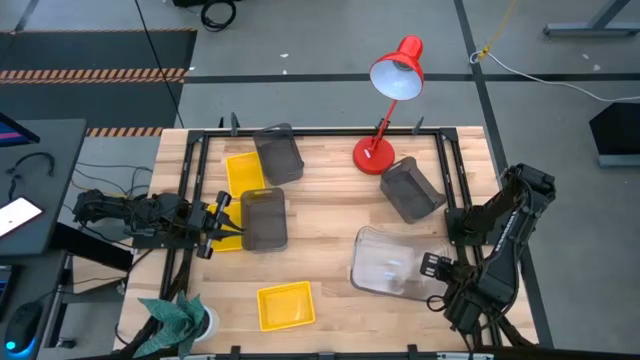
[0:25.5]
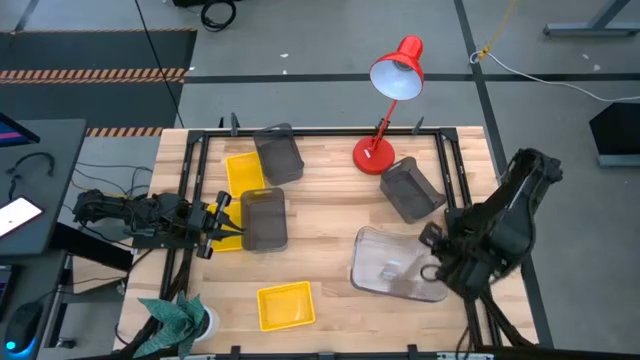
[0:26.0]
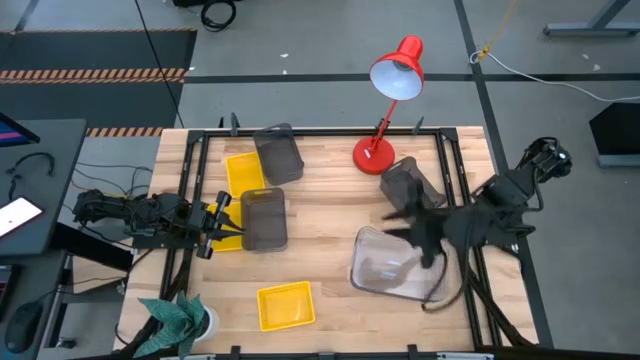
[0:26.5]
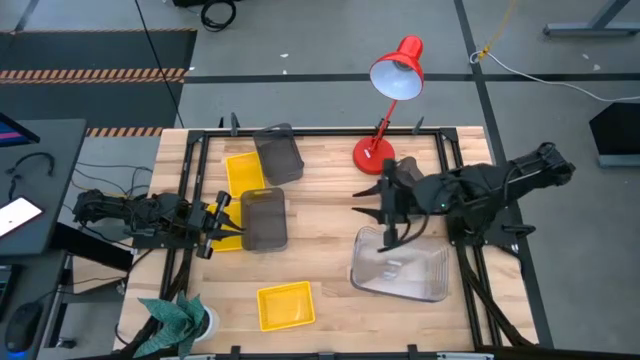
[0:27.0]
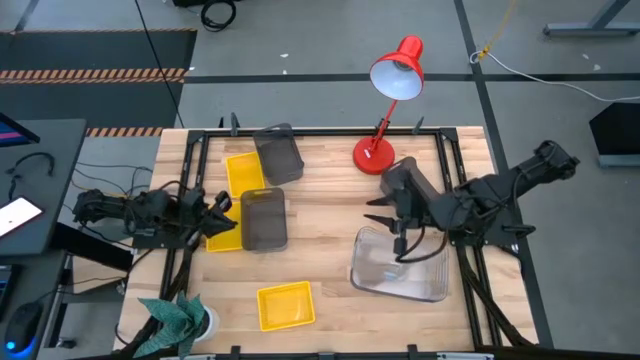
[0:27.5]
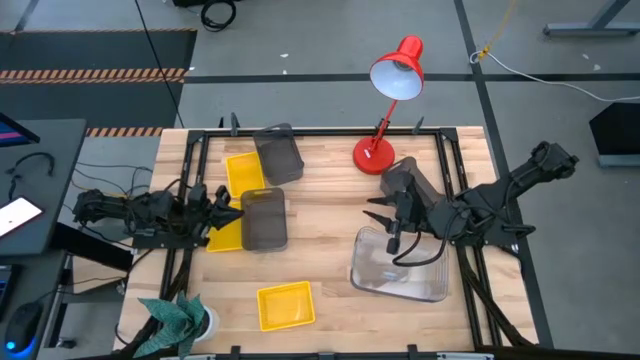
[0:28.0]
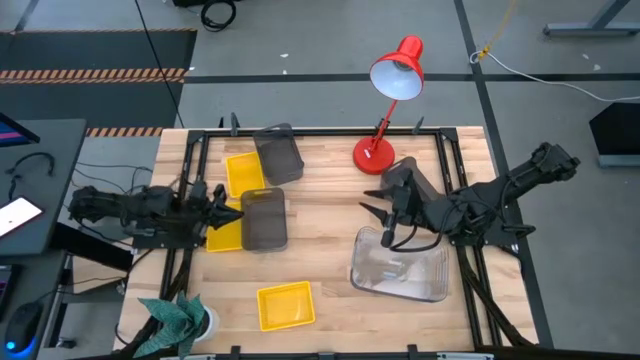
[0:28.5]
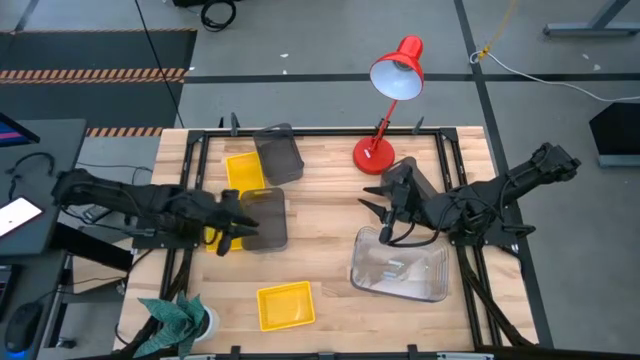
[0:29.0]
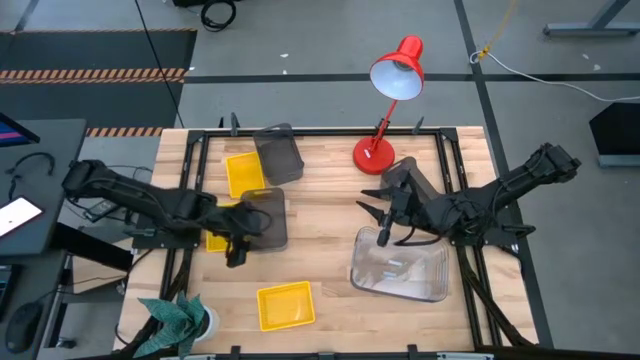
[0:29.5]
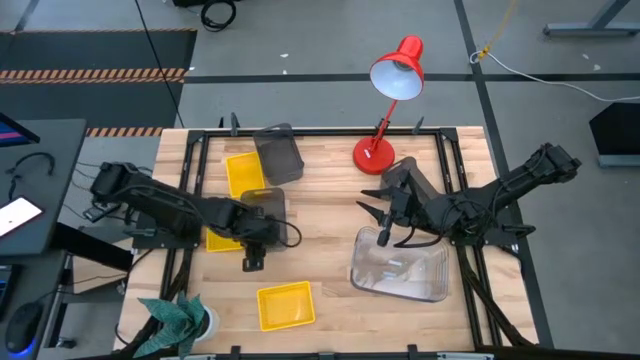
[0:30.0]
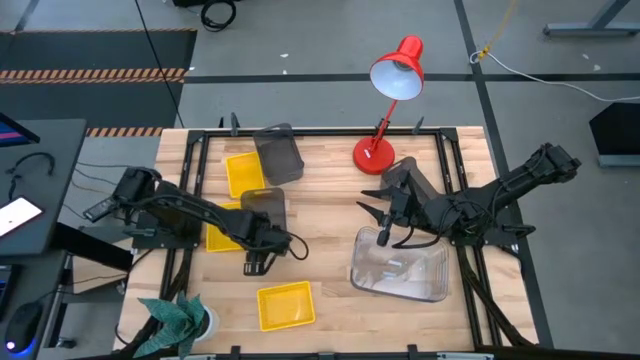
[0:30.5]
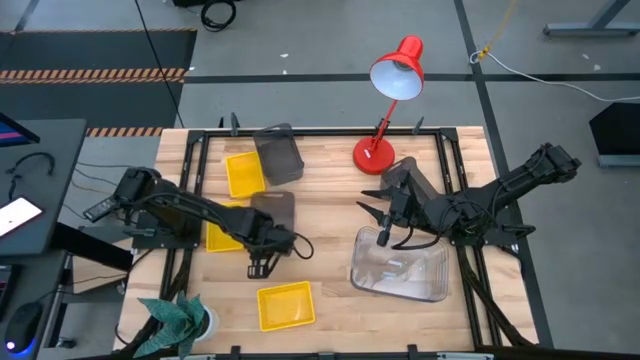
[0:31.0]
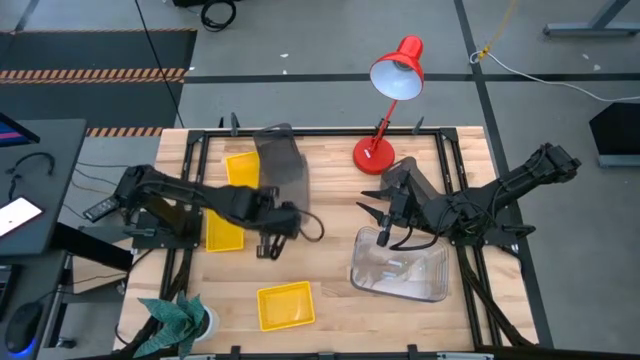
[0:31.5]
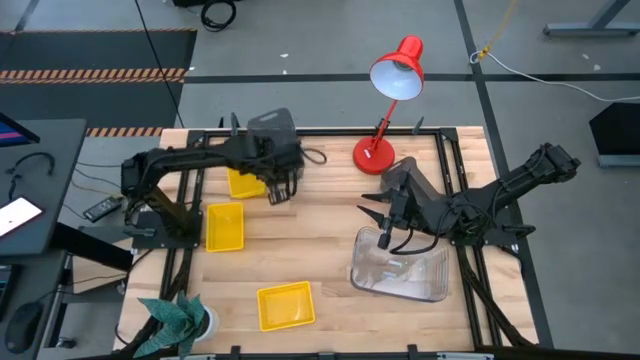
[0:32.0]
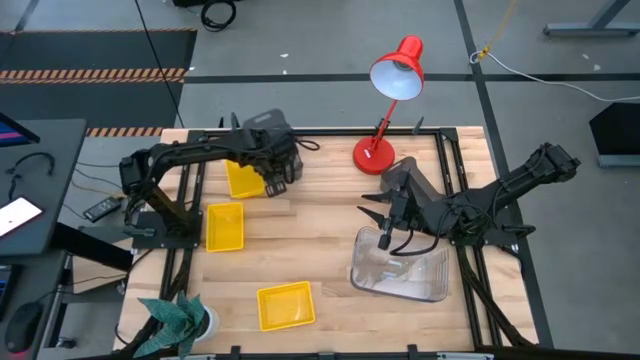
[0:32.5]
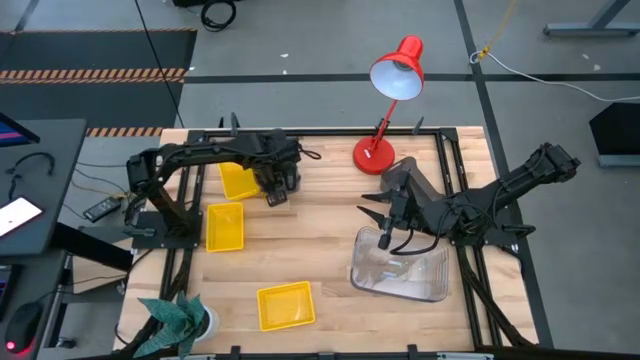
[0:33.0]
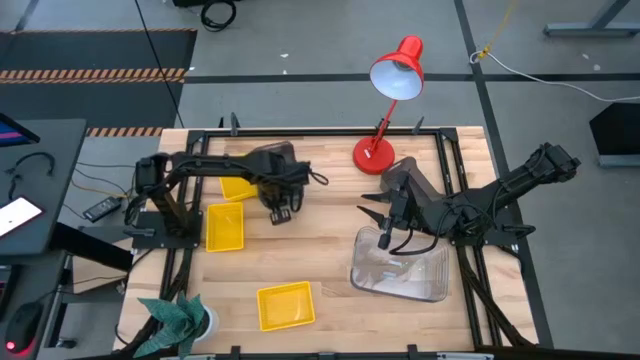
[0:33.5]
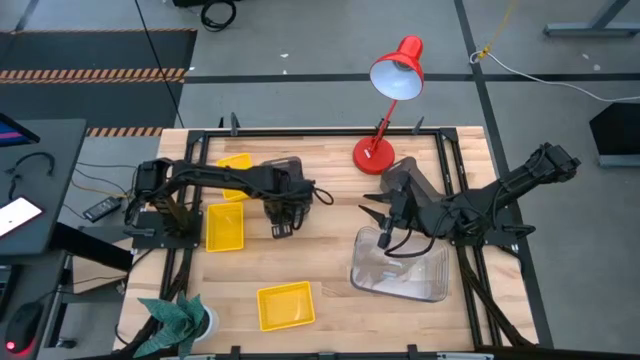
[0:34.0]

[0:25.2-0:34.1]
Stack the bottom left black bin on the top black bin

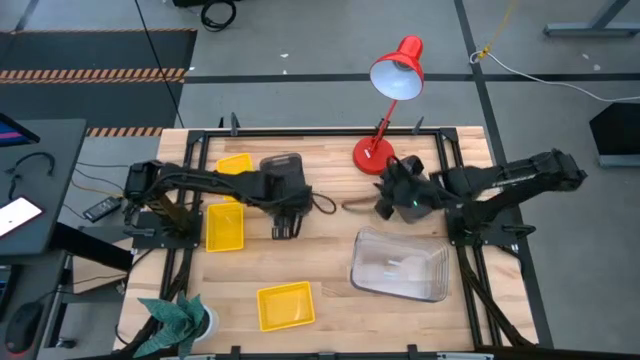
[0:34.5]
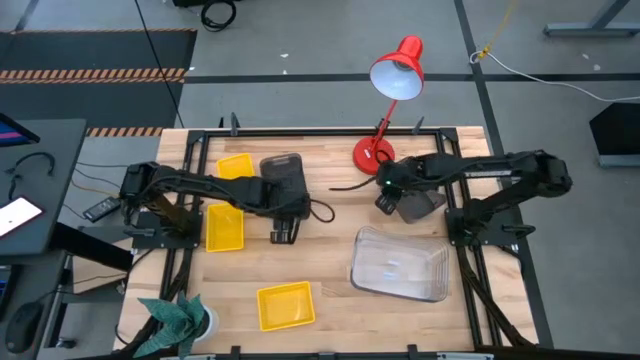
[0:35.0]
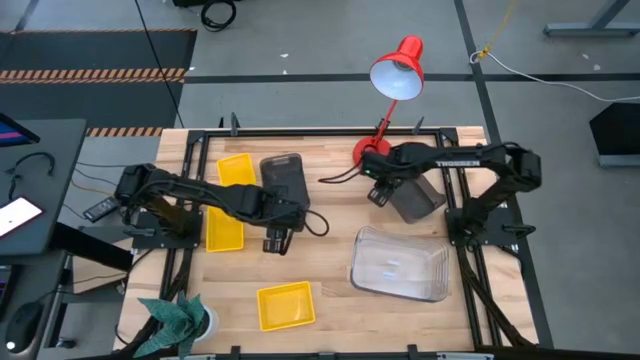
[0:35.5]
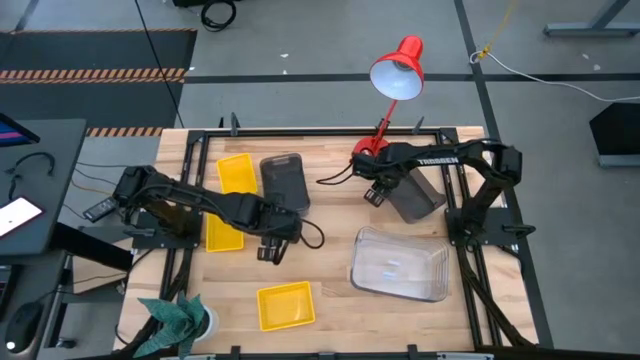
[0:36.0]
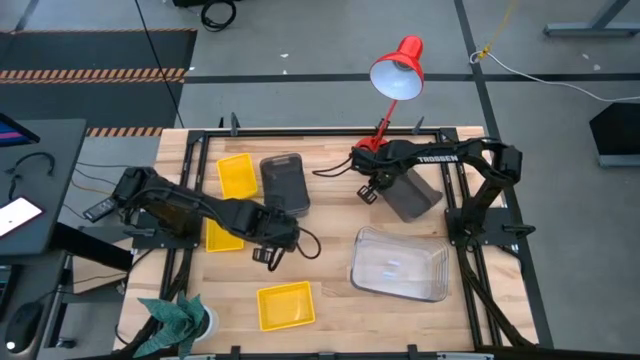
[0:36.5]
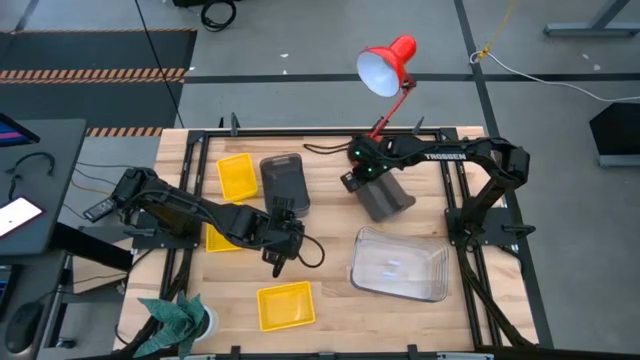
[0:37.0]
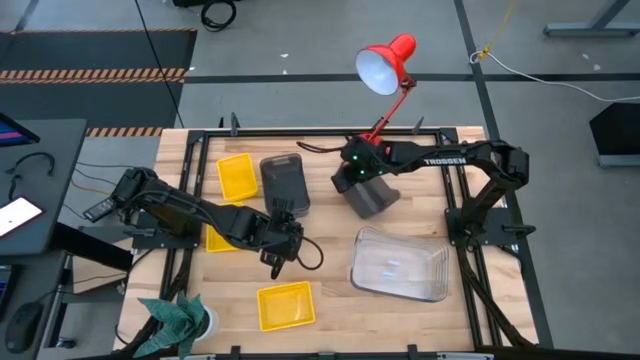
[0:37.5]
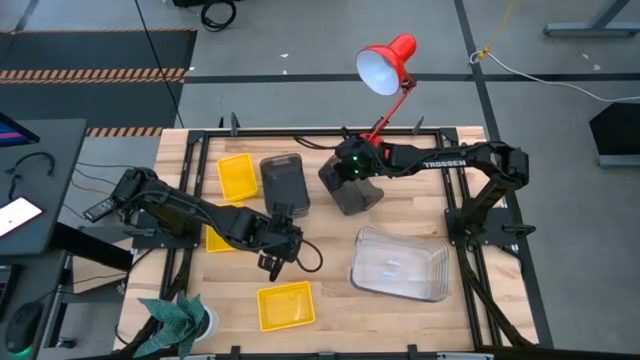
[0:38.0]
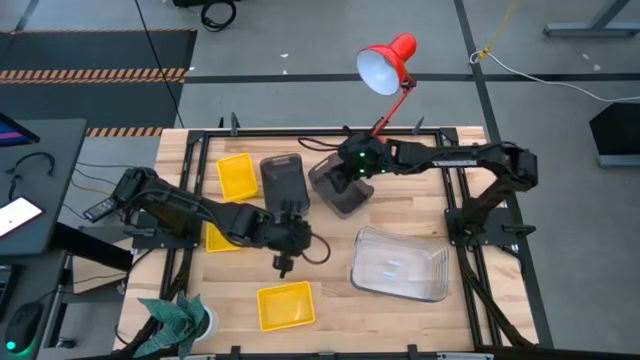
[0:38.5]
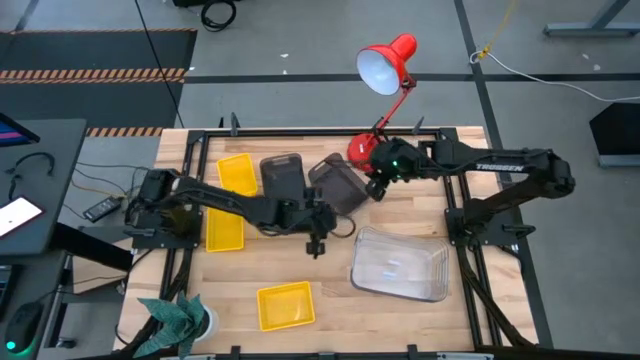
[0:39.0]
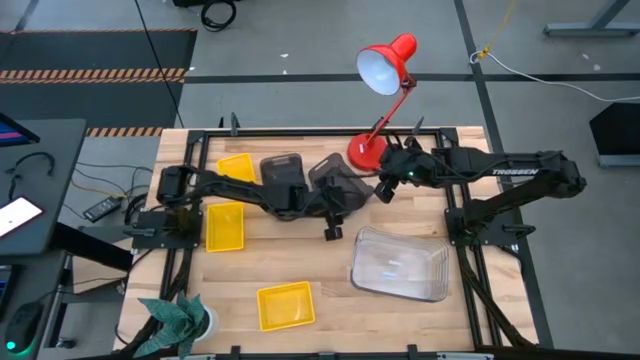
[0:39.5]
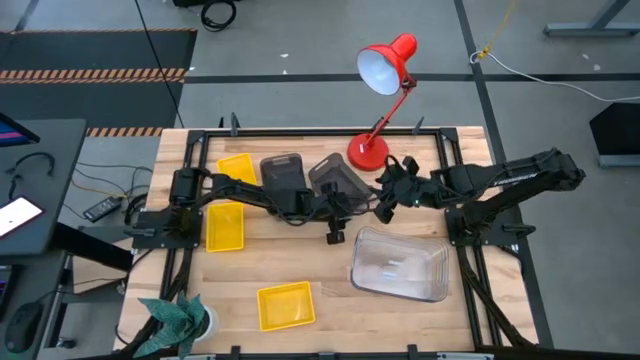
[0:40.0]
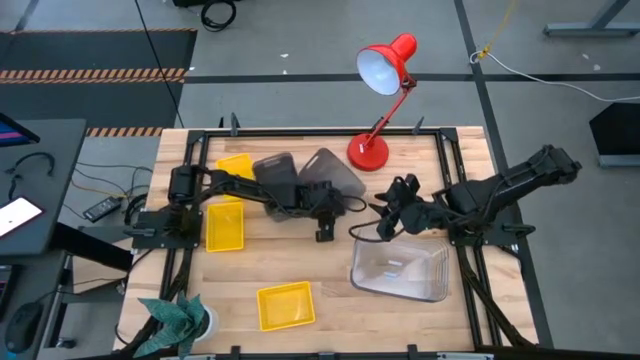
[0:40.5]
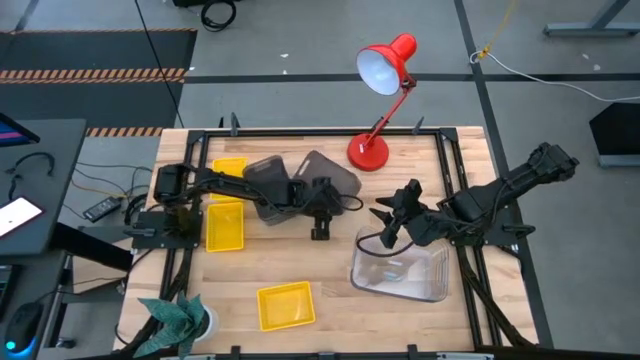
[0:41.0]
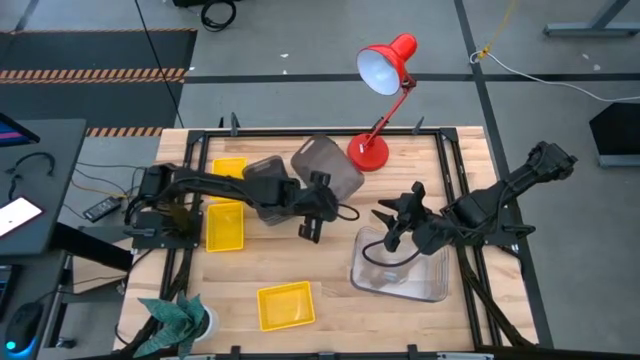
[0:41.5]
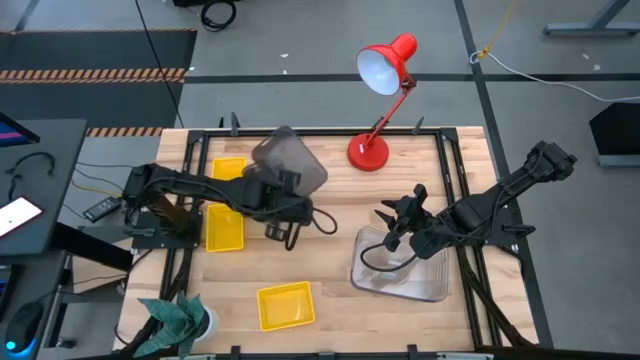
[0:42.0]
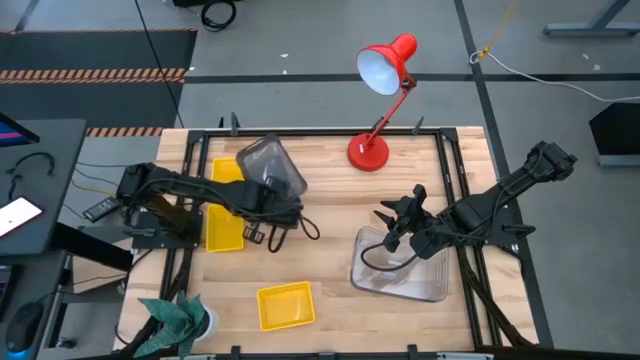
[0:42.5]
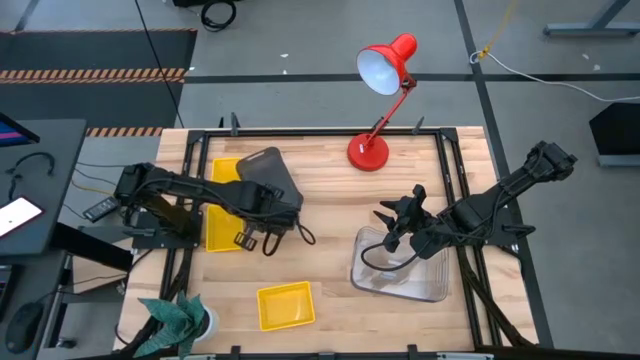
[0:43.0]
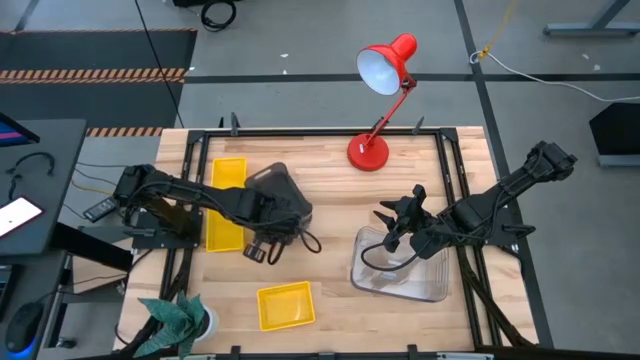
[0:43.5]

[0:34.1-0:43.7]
Stack the black bin on the stacked black bins

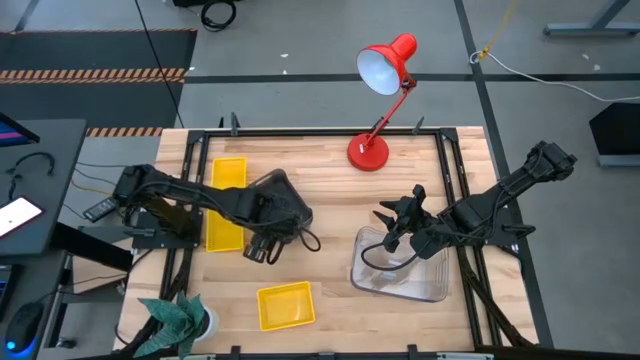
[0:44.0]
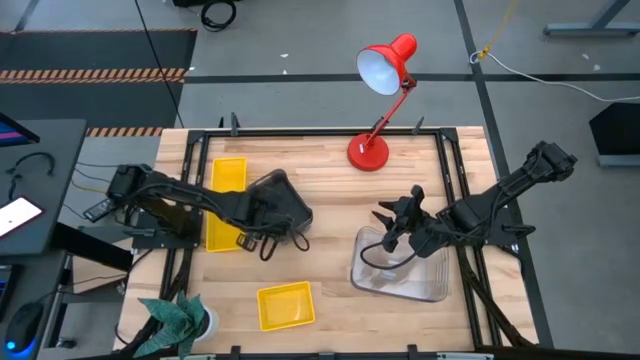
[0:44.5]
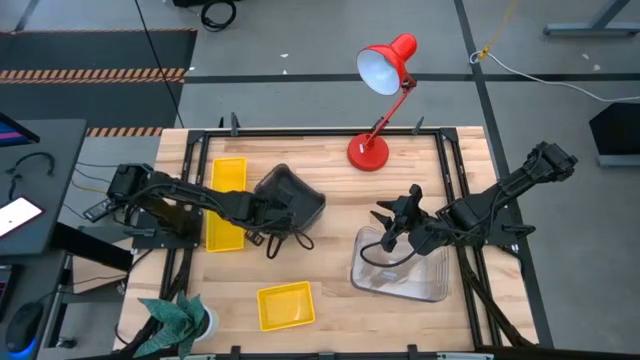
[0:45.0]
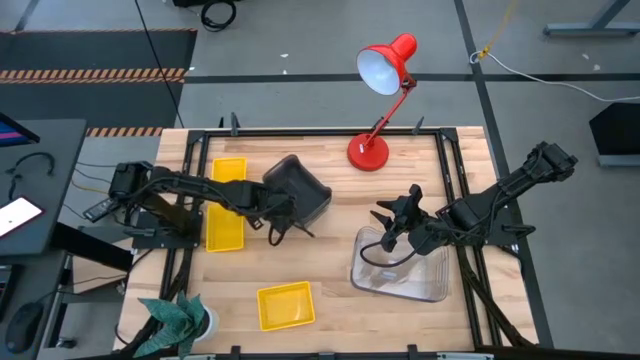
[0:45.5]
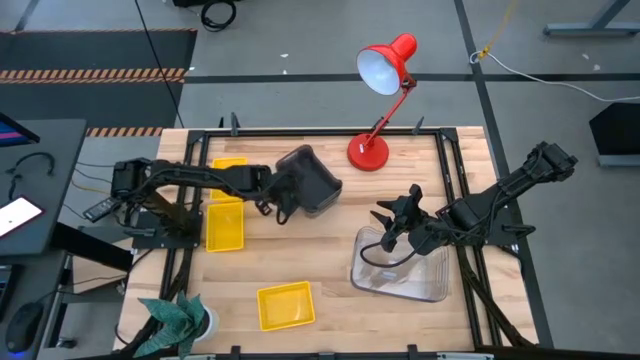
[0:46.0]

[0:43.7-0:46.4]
Move the stacked black bins to the top center of the table
